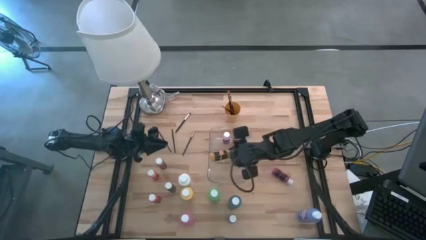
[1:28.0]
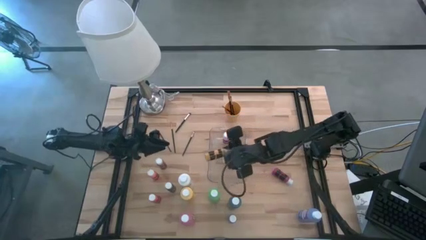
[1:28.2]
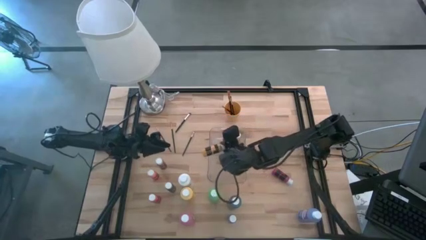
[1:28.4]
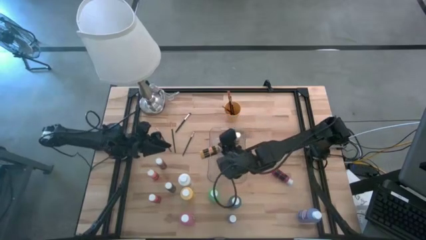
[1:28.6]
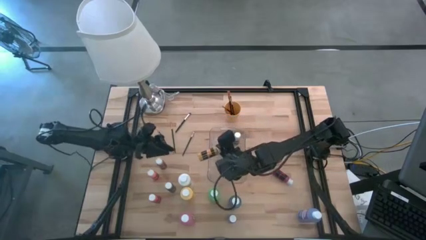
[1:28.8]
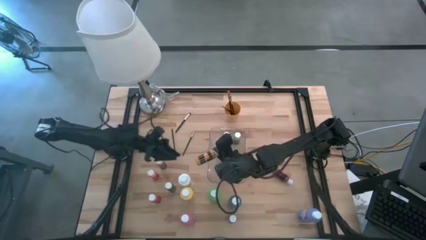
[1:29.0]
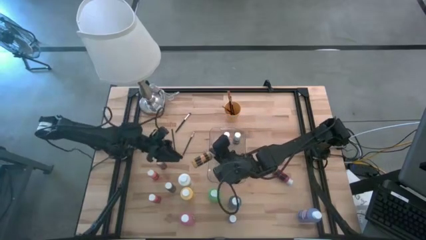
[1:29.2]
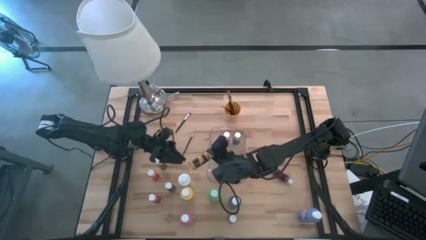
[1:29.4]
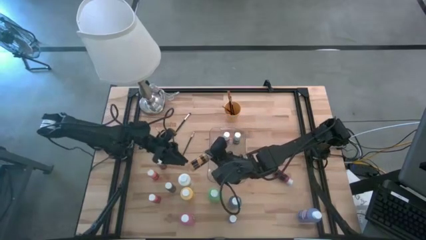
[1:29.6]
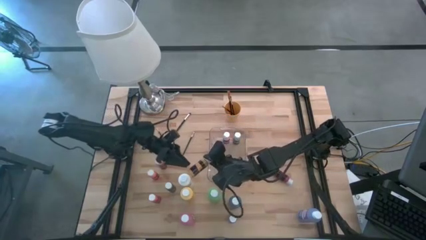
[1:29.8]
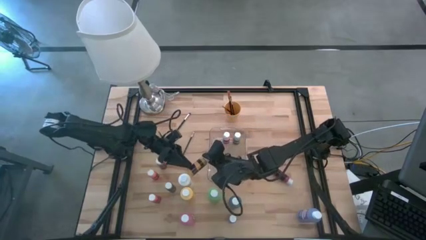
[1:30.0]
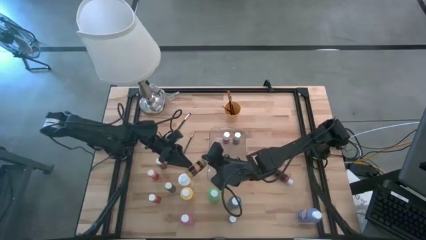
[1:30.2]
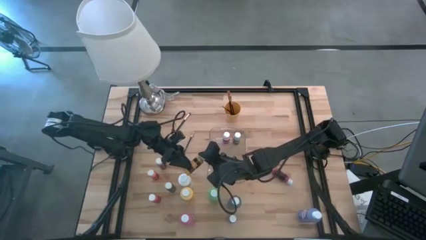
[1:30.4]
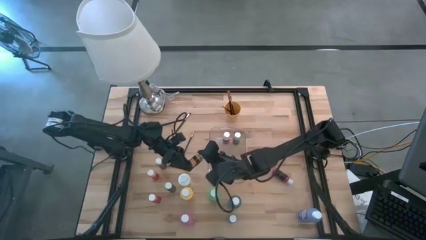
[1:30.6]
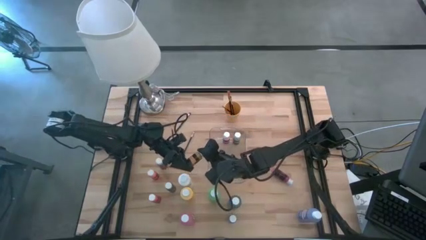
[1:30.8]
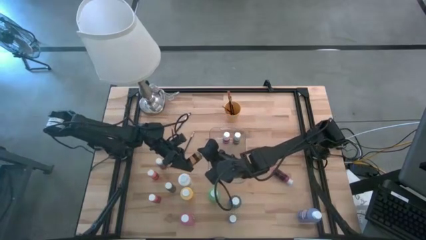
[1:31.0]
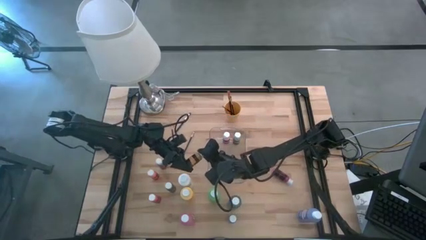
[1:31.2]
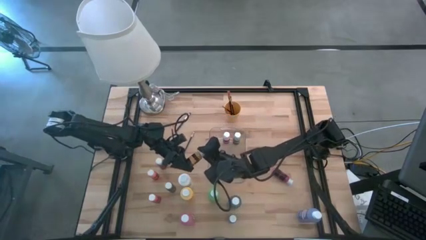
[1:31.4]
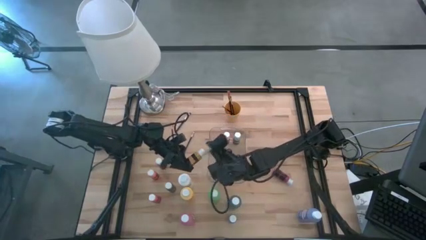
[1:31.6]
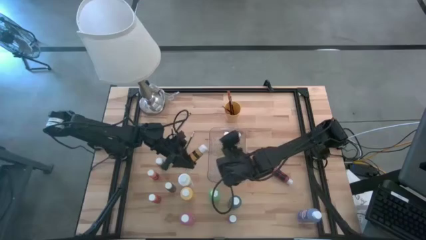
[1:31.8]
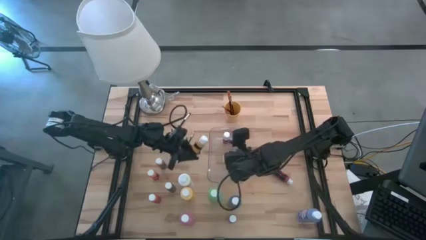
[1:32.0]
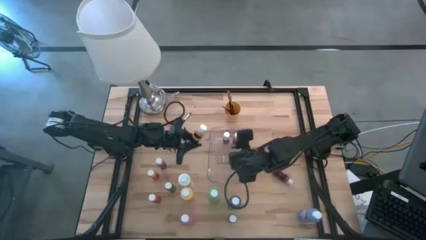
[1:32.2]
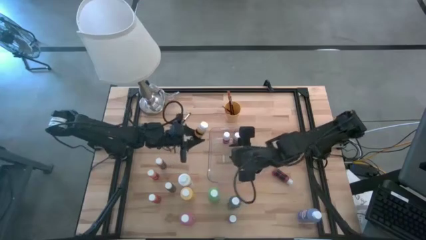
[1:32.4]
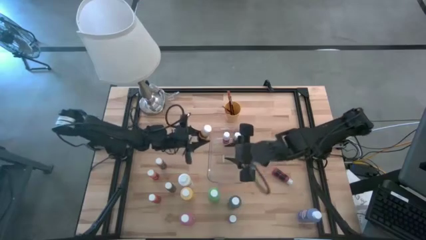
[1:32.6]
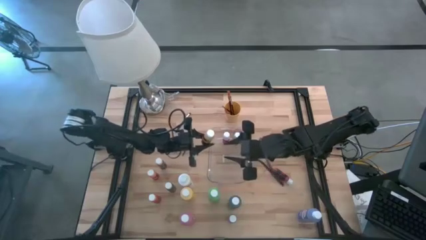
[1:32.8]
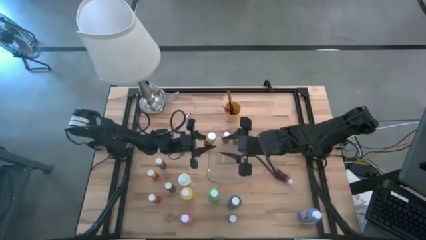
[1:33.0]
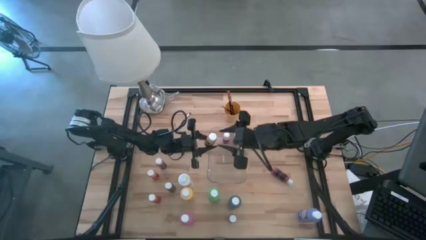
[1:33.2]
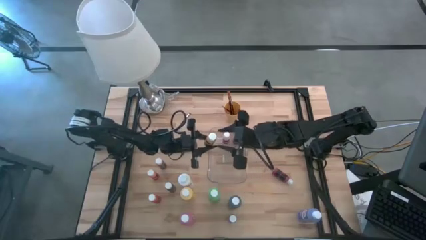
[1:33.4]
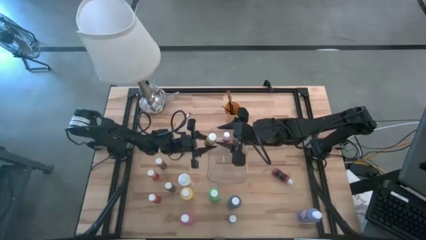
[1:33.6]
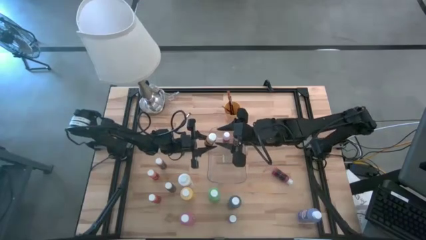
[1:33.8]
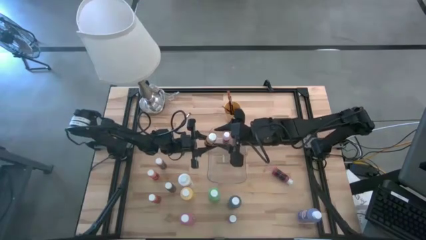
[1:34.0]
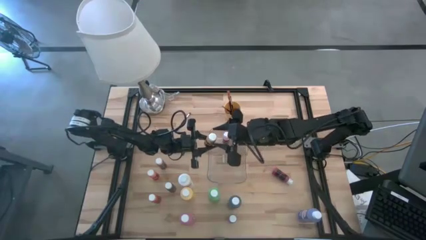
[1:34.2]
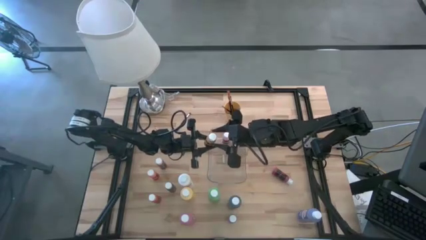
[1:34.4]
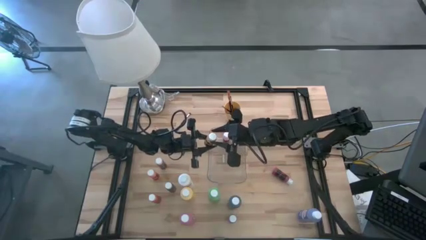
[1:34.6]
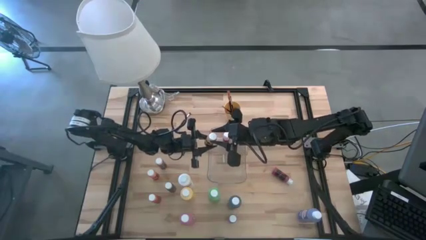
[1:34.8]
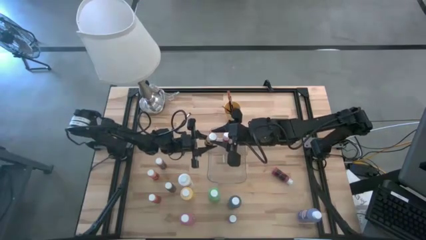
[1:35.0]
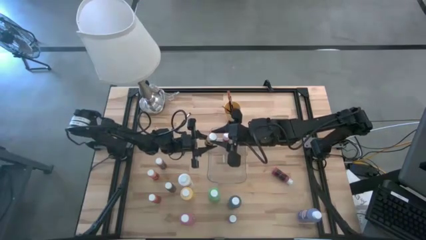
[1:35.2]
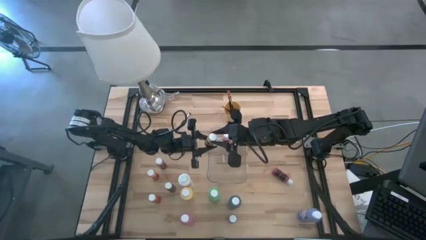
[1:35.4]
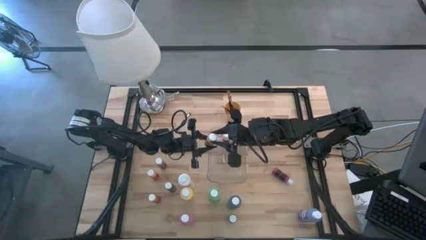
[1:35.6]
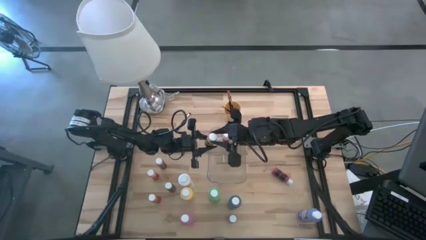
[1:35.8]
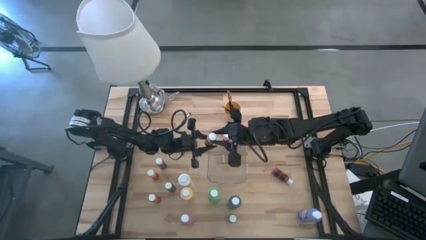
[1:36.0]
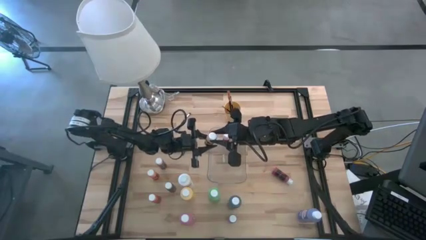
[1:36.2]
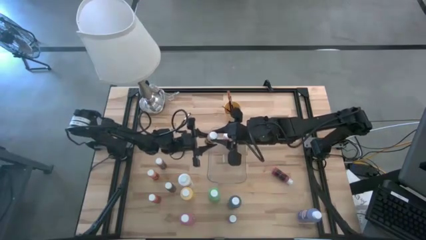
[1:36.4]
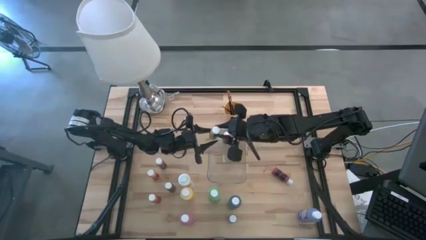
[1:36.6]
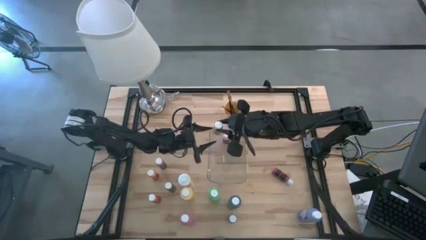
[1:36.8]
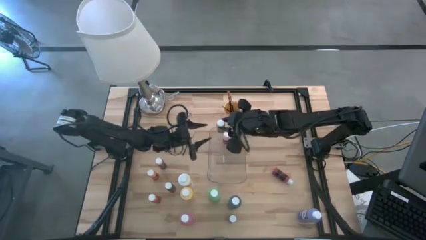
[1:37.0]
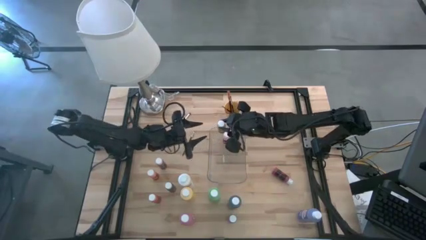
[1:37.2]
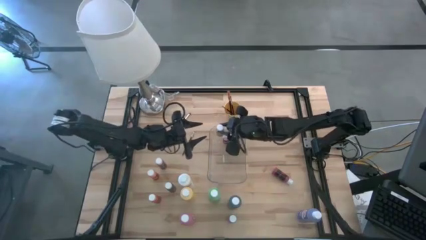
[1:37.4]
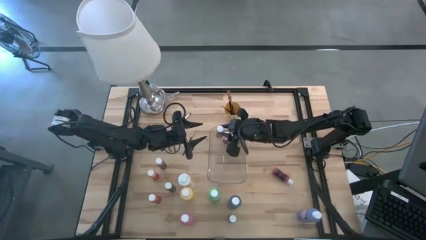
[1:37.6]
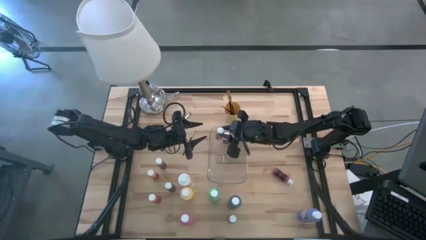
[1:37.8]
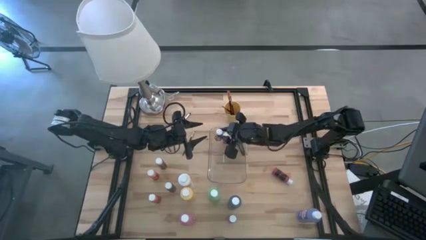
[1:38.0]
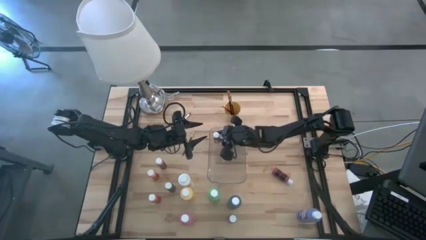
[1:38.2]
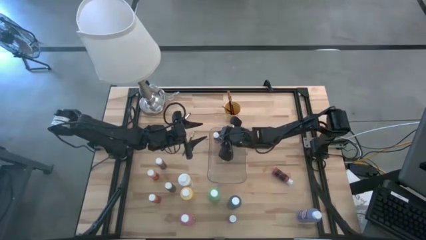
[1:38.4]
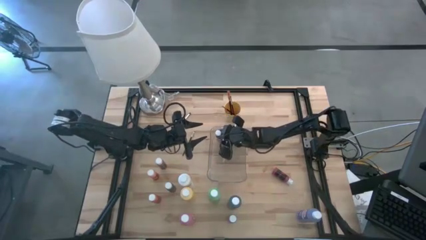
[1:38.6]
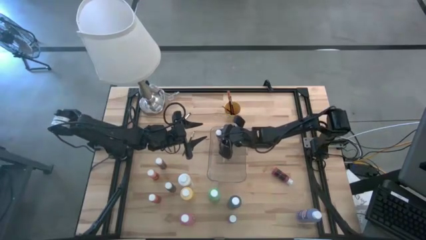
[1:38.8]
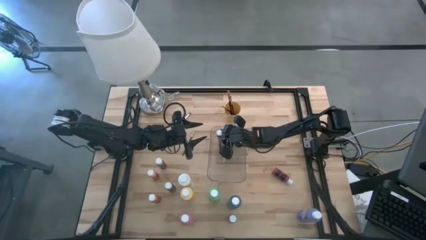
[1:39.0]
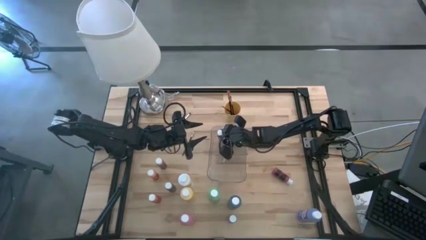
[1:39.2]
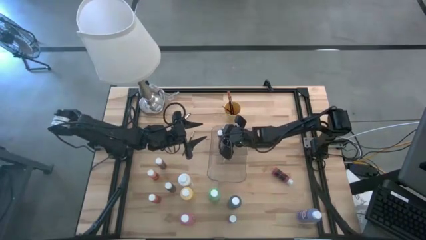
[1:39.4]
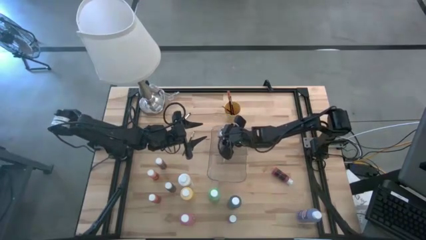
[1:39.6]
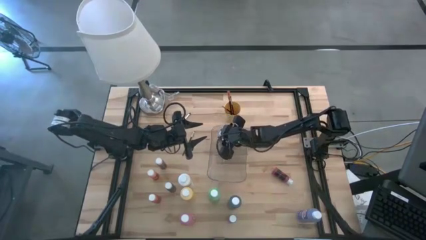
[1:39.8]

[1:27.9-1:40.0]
Task: Pick & Place Paint Supplies
Put the small yellow paint bottle into the transparent bin

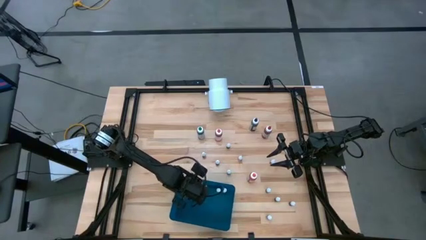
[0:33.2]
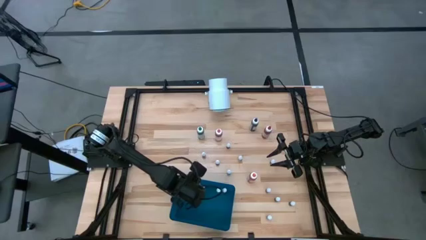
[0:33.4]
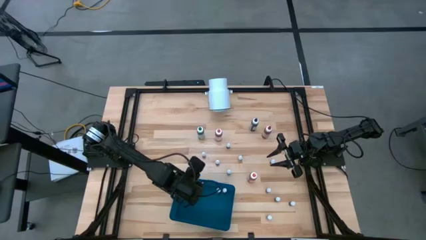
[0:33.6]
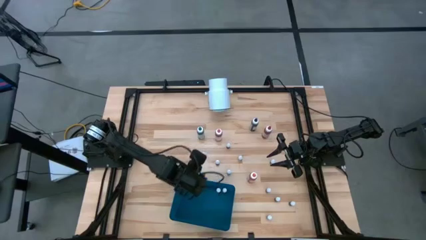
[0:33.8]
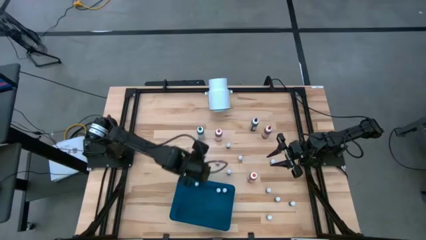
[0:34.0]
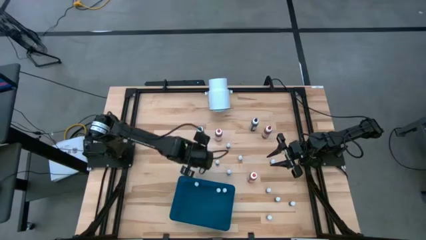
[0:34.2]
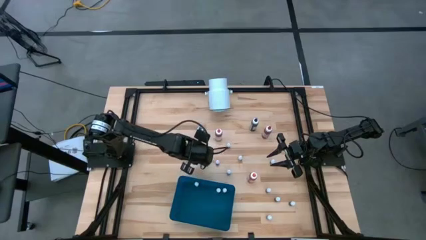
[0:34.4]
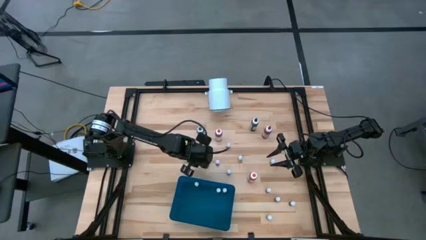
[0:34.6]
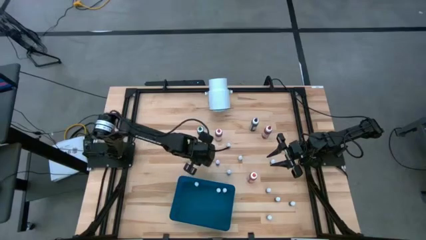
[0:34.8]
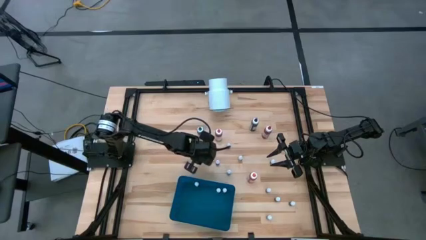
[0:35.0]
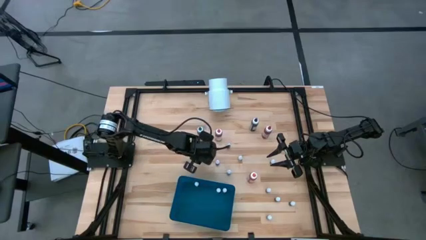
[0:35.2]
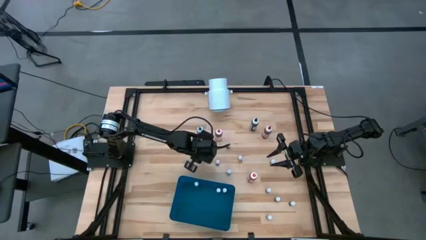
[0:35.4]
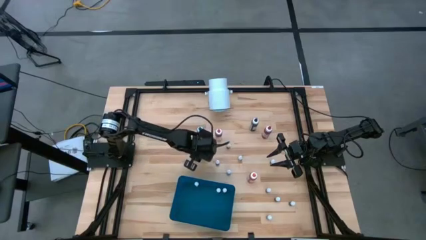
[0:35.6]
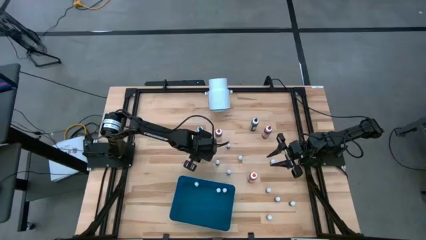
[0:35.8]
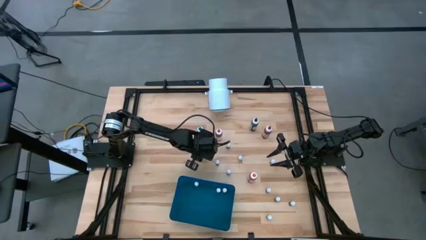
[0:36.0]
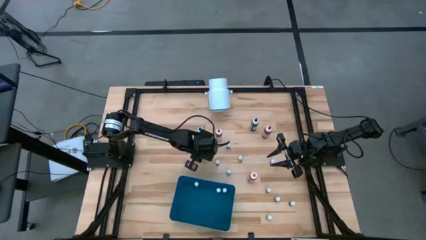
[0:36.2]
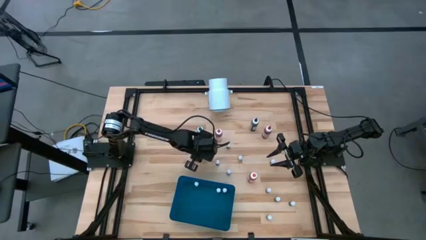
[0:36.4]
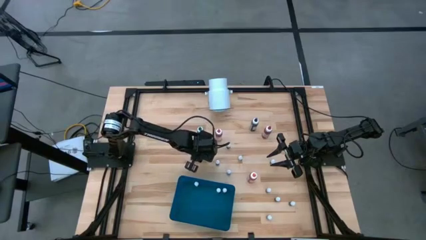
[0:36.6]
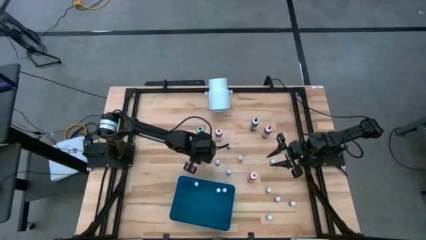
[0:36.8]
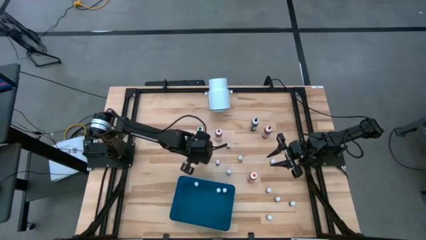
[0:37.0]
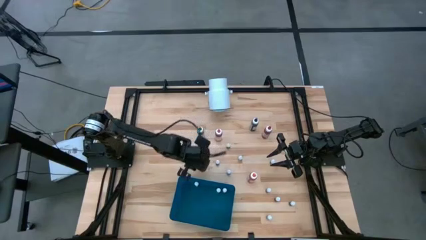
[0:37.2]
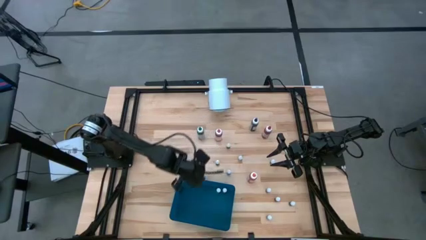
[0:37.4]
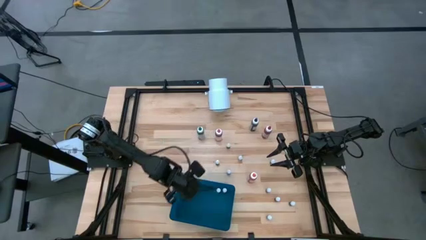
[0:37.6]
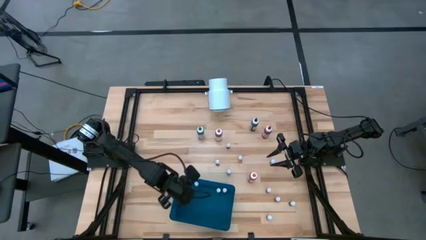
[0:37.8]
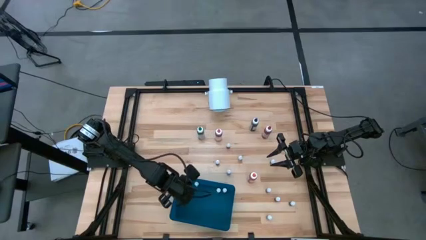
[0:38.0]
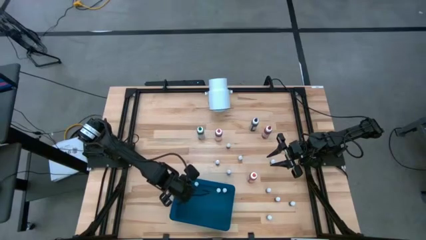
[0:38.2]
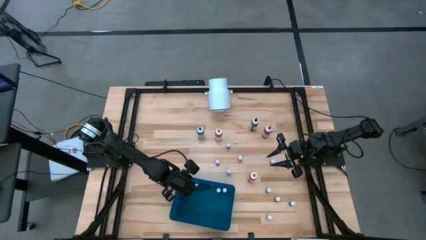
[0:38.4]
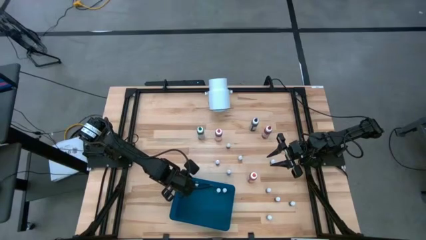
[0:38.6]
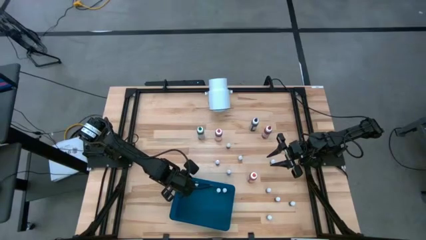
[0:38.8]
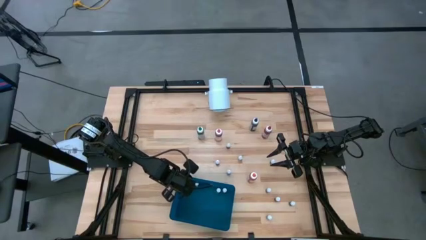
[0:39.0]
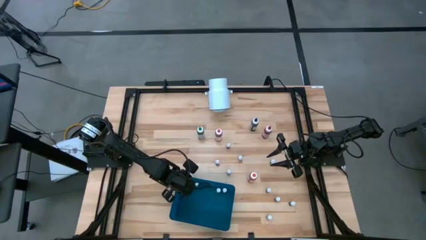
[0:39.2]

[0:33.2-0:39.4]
Task: Pick & Place food coloring
Put the small violet food coloring bottle into the blue bin
